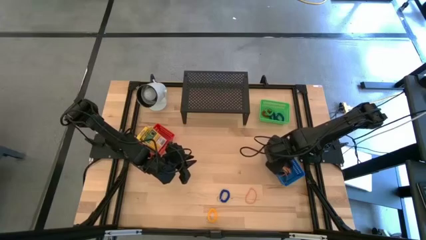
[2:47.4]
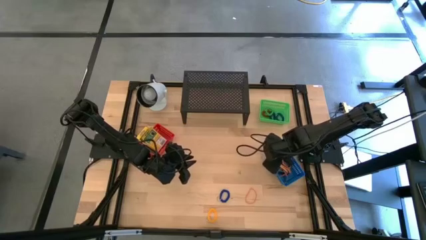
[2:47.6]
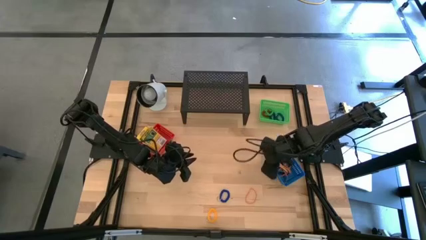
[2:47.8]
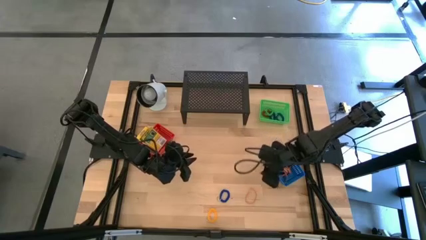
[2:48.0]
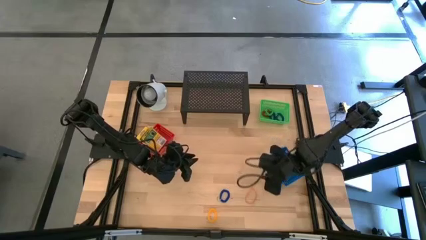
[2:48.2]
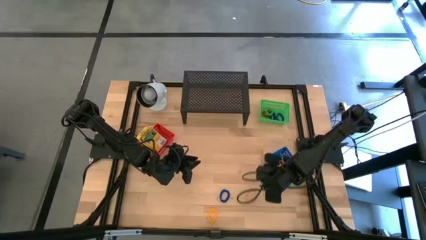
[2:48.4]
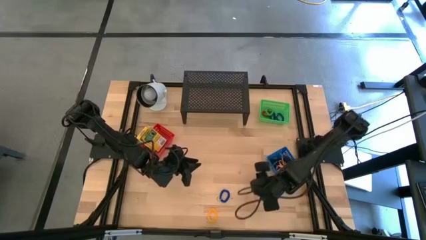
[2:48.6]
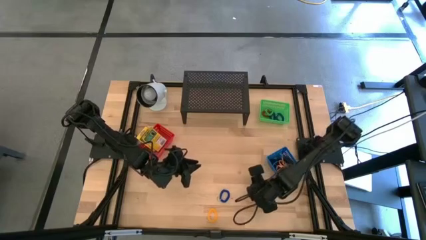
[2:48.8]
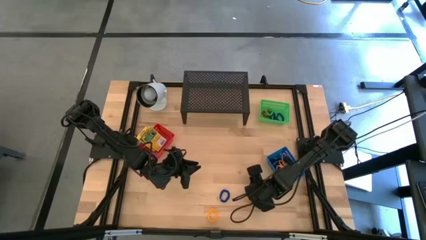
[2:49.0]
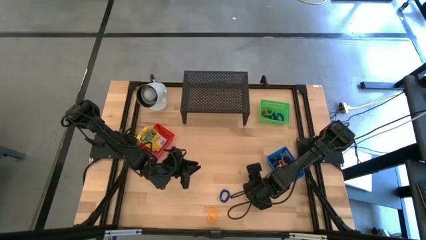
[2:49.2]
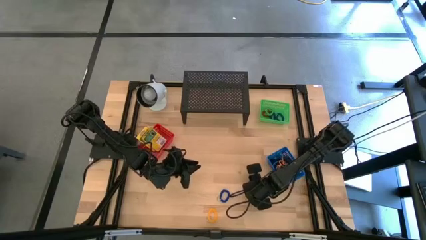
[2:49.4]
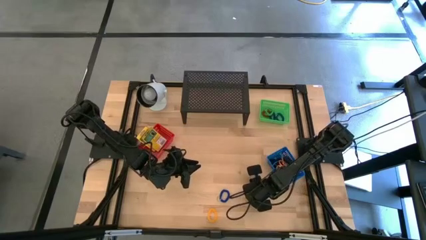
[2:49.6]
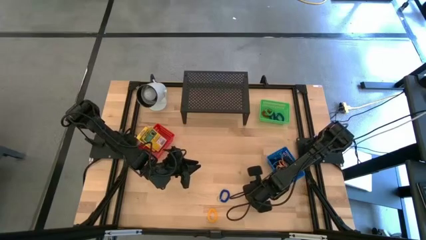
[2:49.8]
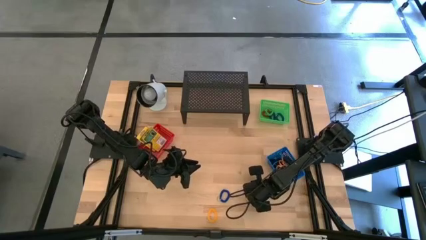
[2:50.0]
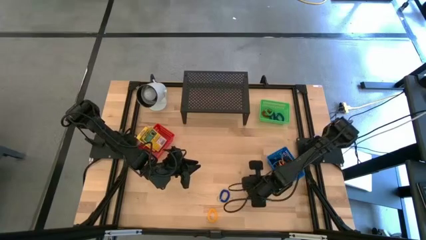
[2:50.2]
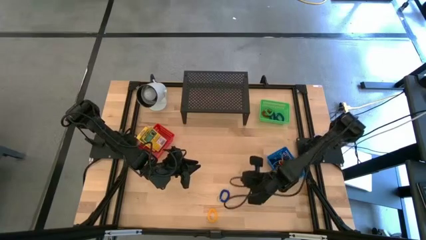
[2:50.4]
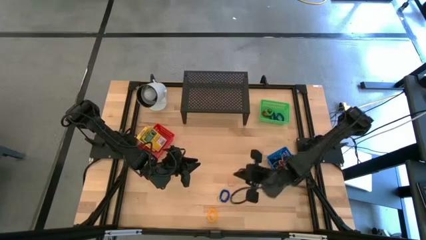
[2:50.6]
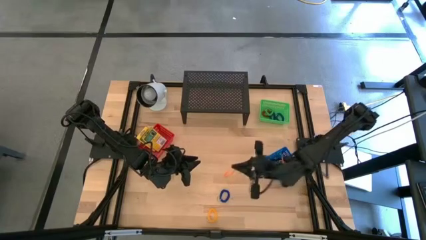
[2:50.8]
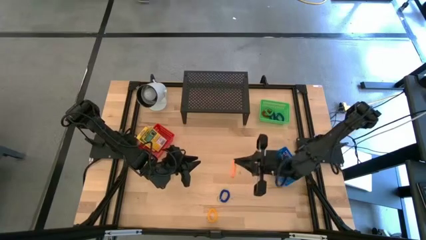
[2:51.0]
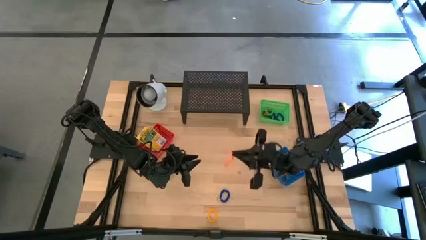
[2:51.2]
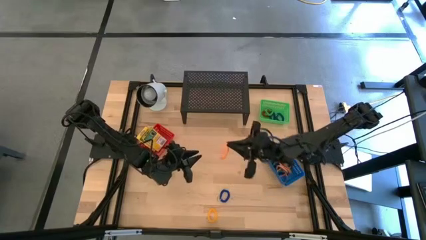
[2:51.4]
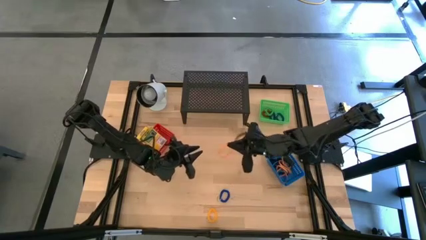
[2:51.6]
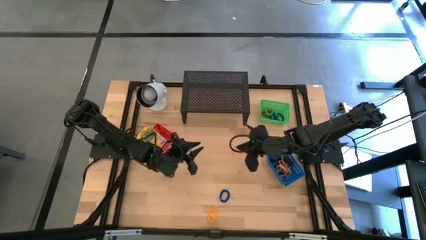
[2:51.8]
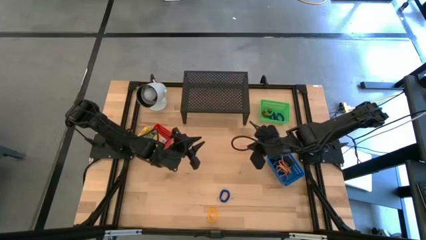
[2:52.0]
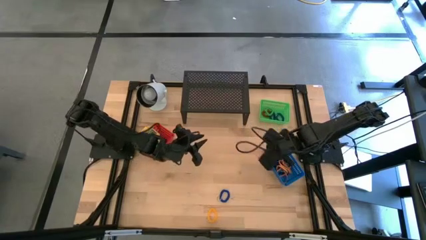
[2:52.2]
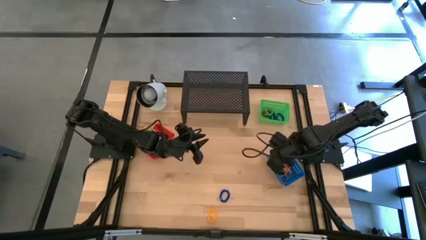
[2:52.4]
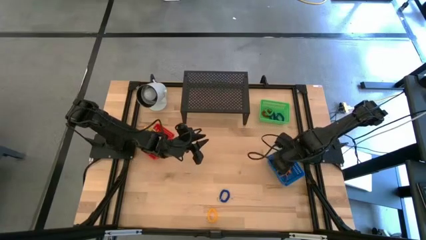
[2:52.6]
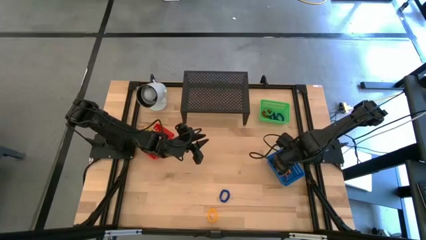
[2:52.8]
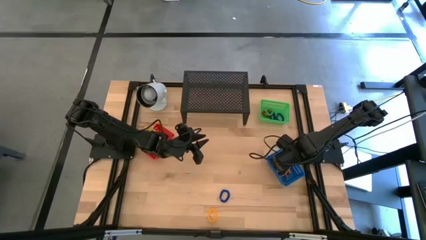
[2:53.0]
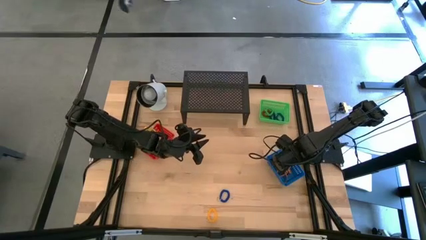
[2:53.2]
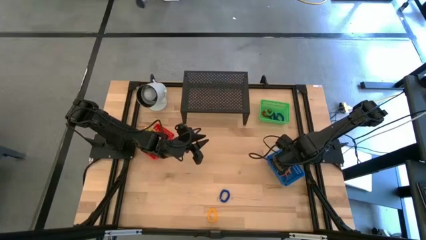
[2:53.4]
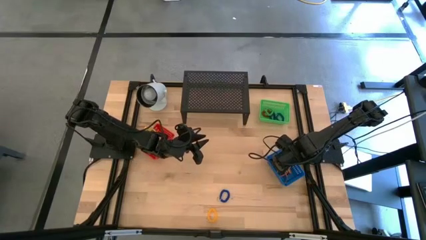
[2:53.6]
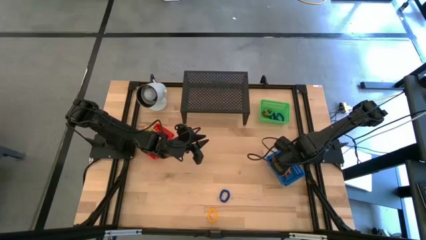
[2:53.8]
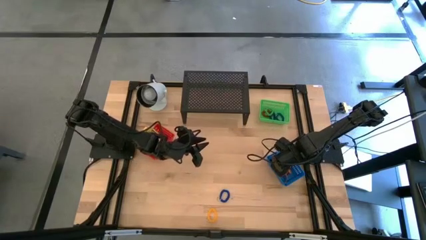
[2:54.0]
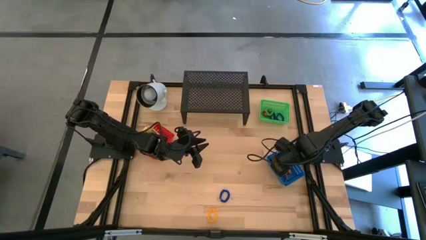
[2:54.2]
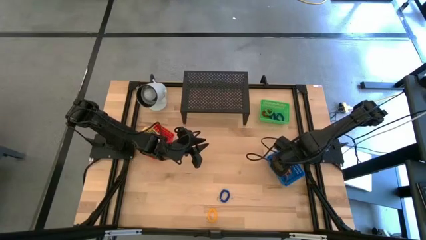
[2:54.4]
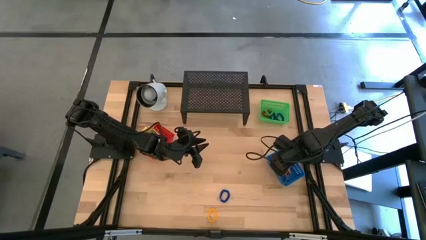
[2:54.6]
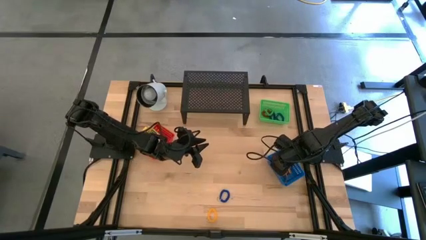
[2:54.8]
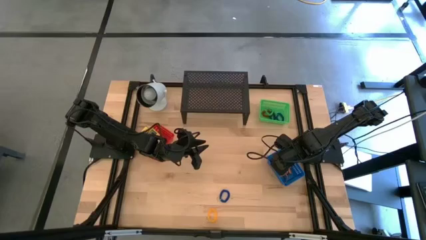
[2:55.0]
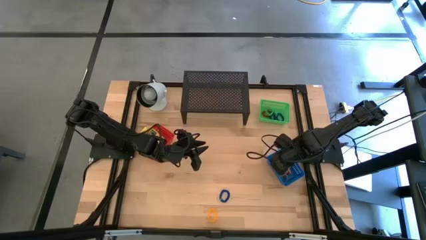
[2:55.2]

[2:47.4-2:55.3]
Task: Pick & Place Office Desk Supplies
Put the orange rubber band into the blue bin

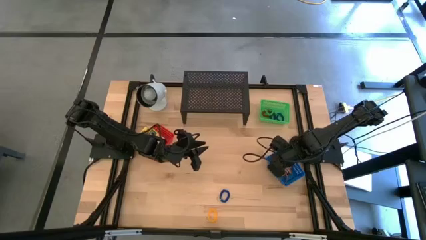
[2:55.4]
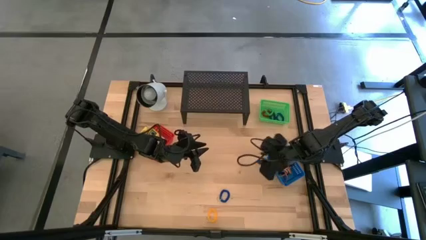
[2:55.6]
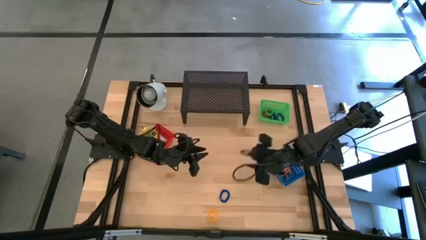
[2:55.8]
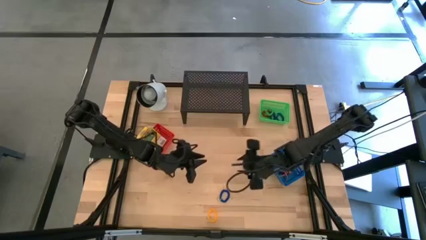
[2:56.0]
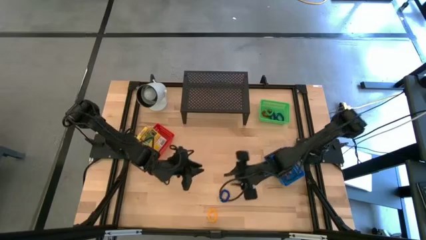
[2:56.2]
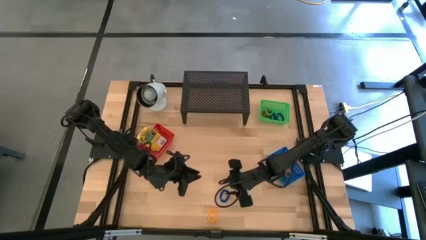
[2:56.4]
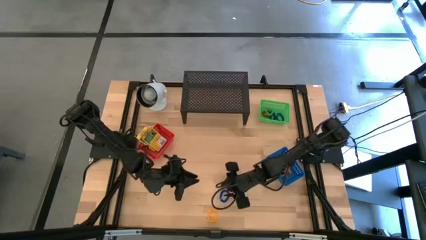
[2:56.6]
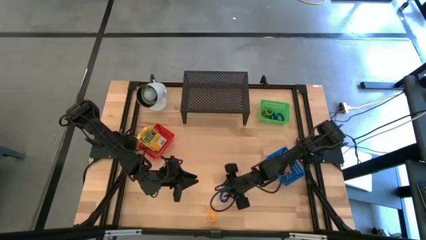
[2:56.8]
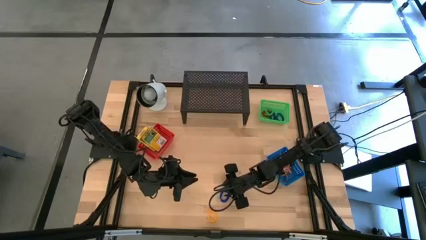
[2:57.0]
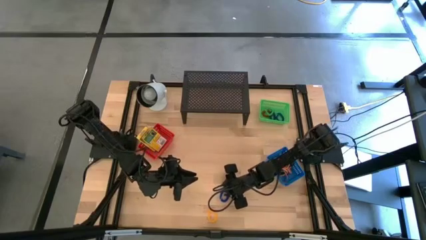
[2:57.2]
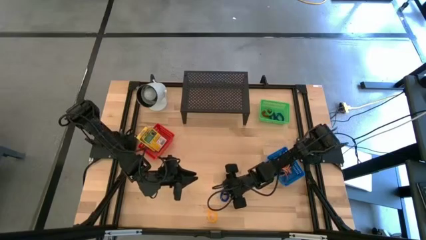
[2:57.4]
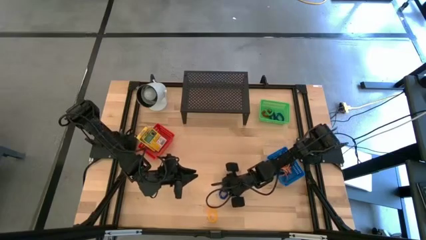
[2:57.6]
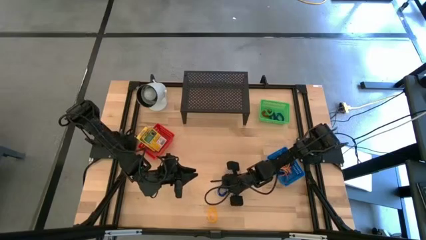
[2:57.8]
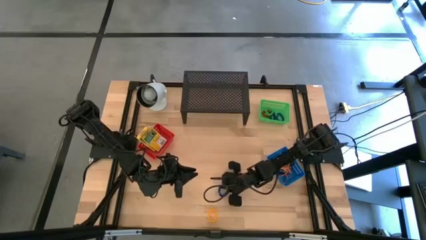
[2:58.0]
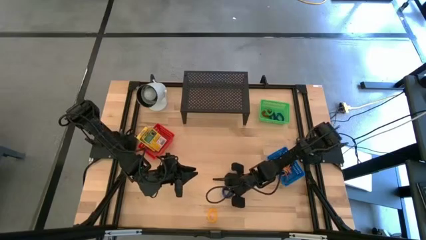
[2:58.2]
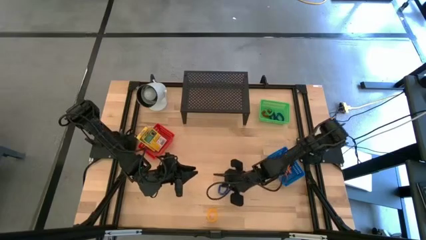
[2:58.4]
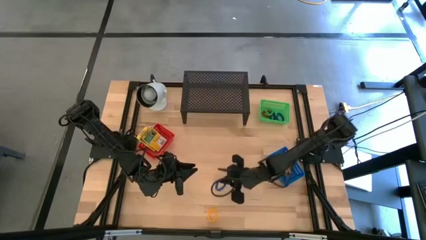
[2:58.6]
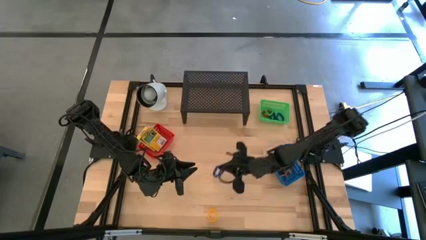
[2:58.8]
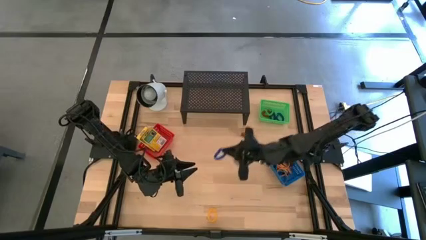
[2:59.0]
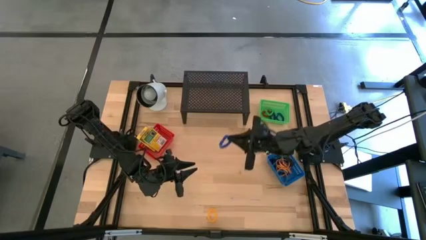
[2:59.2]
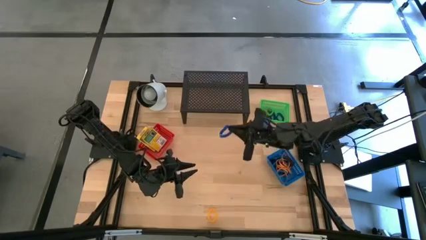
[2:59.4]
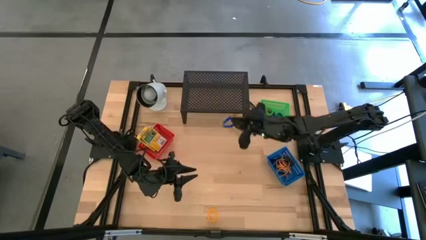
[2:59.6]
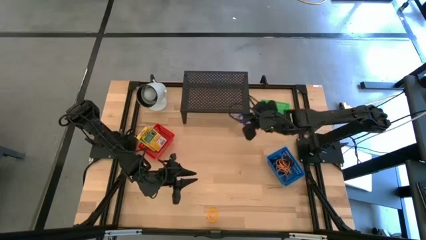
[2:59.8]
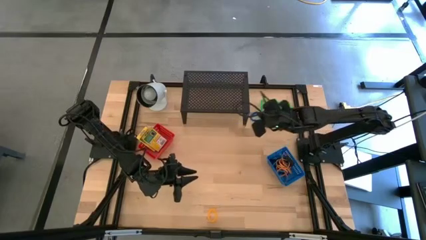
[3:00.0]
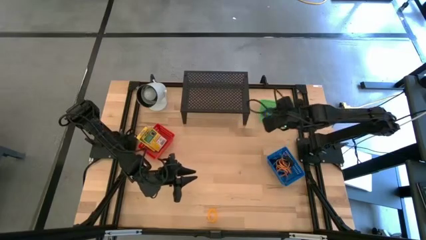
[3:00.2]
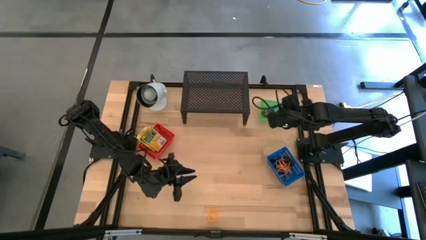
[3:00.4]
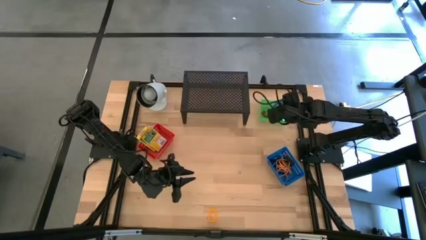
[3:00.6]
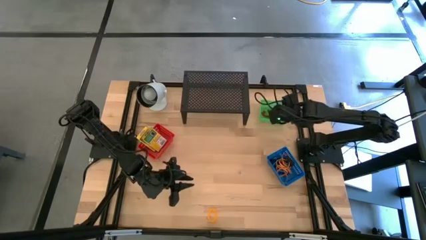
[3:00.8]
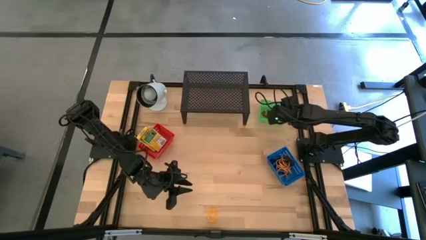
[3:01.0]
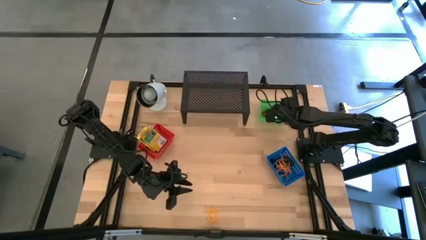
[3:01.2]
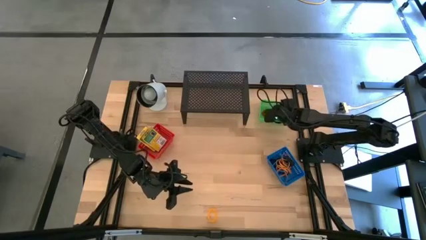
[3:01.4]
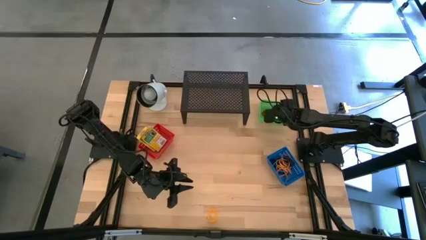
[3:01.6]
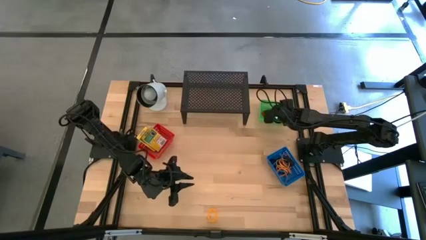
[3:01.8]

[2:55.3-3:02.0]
Put the blue spring keychain into the green bin
